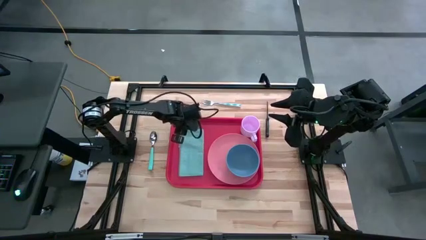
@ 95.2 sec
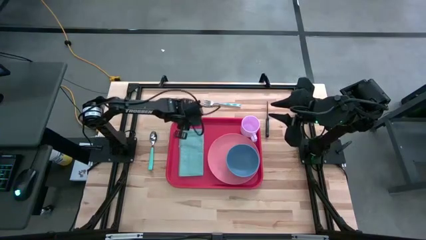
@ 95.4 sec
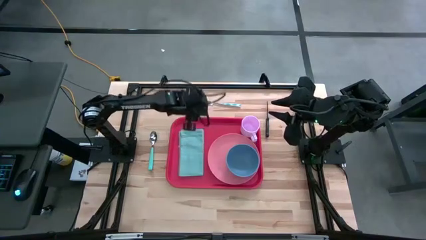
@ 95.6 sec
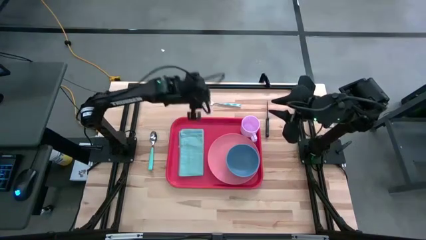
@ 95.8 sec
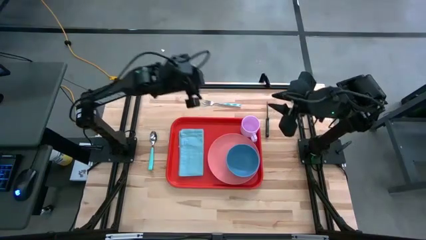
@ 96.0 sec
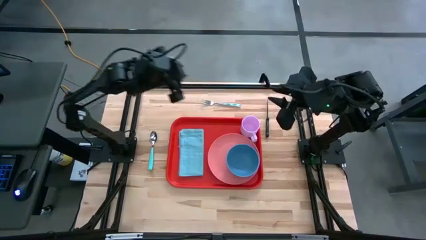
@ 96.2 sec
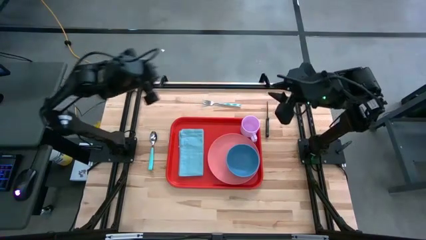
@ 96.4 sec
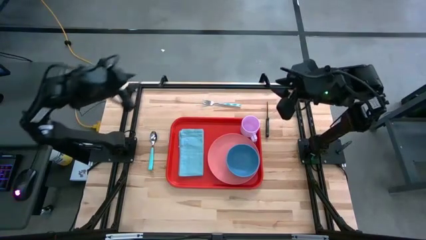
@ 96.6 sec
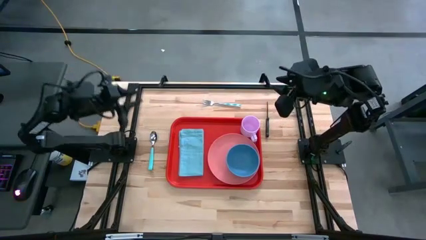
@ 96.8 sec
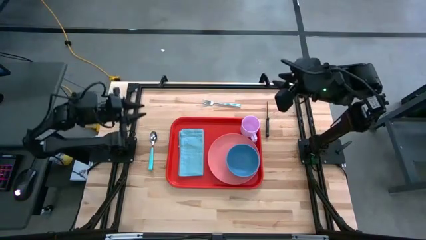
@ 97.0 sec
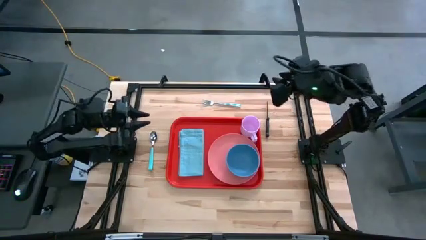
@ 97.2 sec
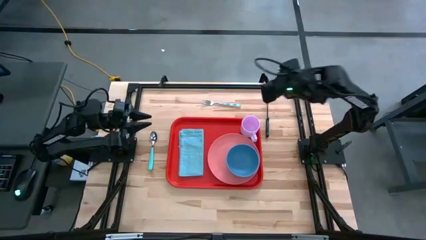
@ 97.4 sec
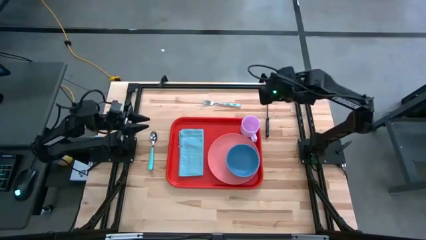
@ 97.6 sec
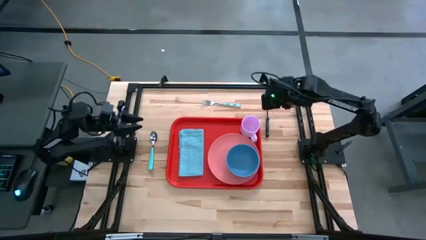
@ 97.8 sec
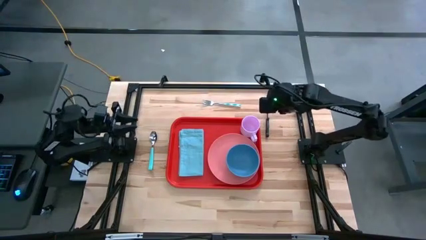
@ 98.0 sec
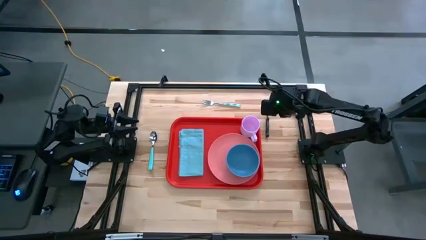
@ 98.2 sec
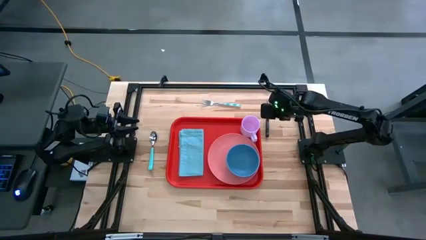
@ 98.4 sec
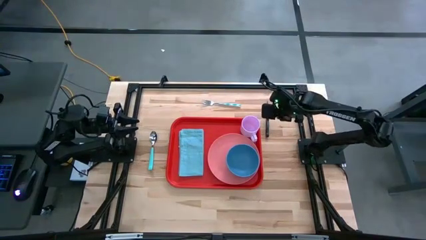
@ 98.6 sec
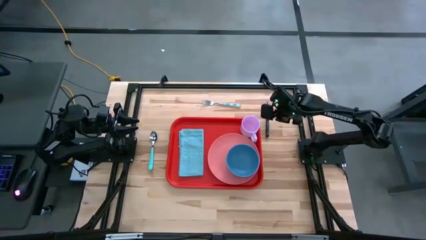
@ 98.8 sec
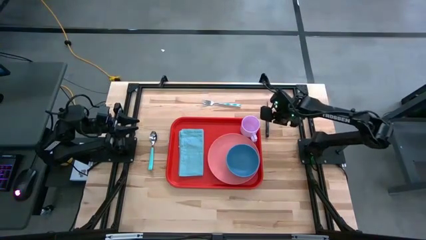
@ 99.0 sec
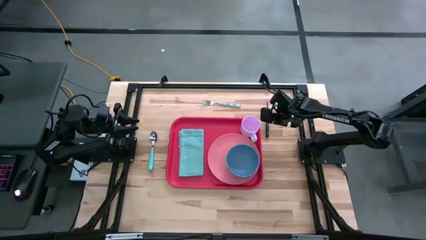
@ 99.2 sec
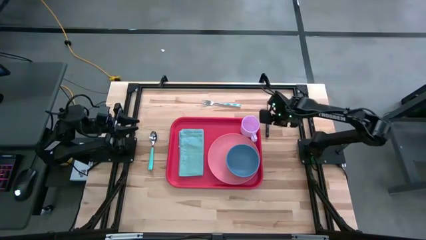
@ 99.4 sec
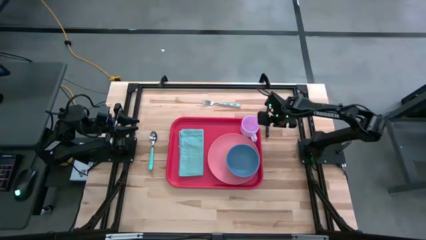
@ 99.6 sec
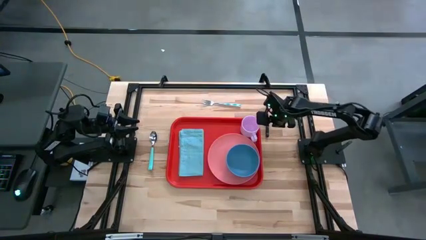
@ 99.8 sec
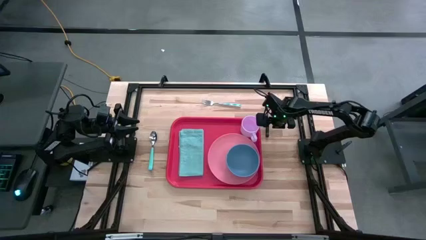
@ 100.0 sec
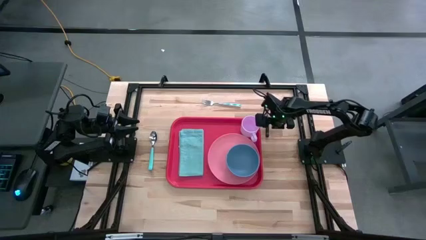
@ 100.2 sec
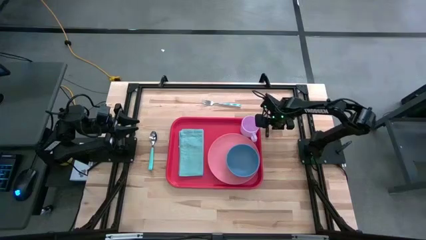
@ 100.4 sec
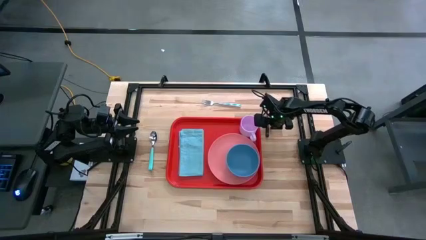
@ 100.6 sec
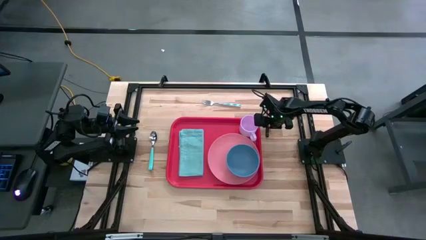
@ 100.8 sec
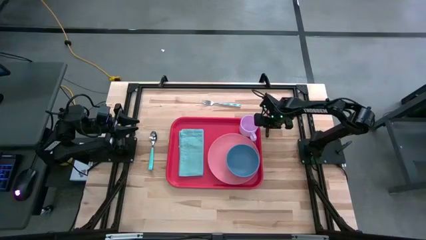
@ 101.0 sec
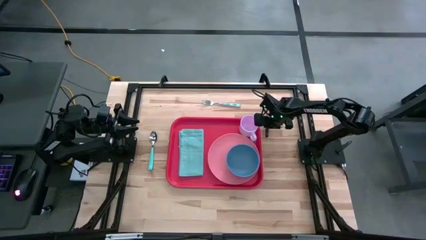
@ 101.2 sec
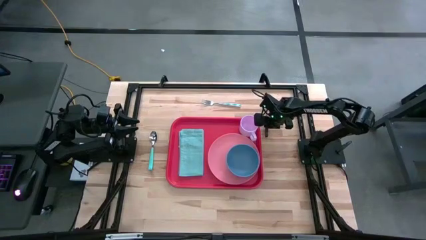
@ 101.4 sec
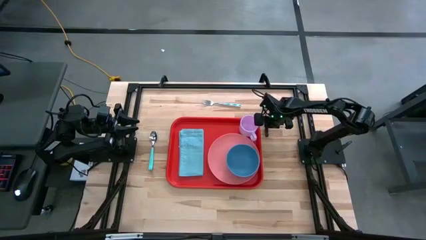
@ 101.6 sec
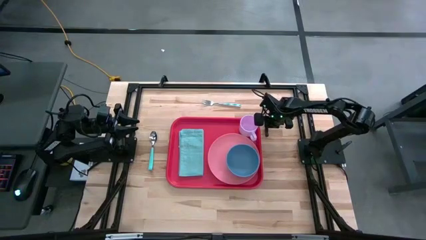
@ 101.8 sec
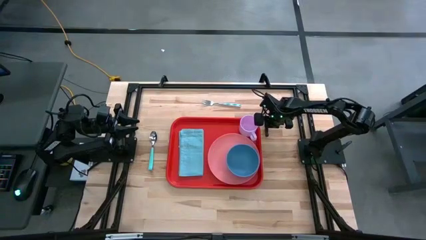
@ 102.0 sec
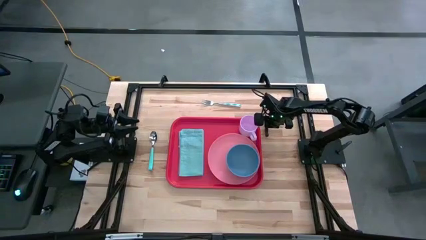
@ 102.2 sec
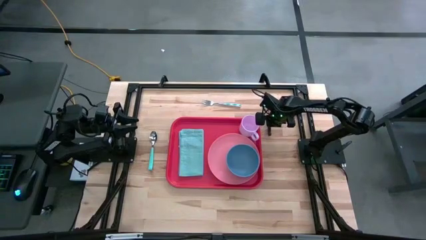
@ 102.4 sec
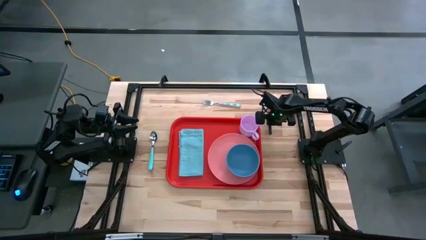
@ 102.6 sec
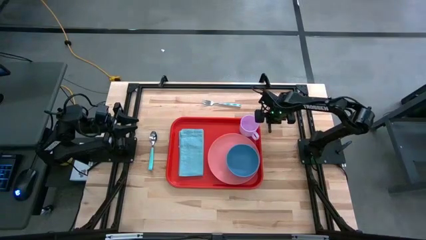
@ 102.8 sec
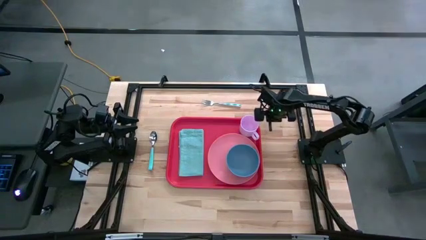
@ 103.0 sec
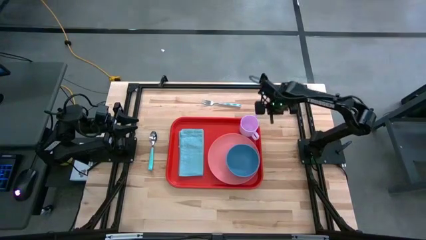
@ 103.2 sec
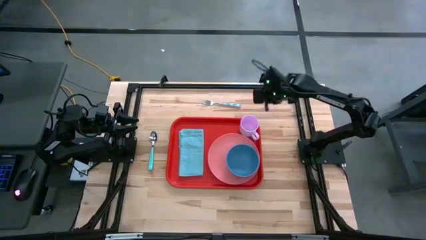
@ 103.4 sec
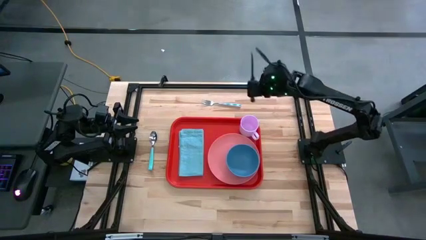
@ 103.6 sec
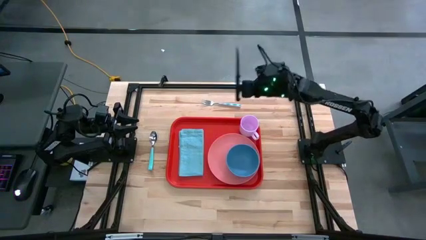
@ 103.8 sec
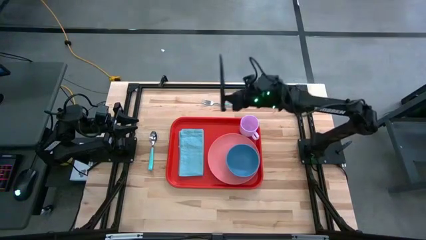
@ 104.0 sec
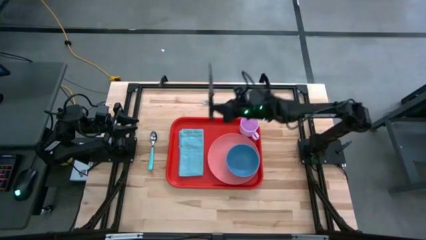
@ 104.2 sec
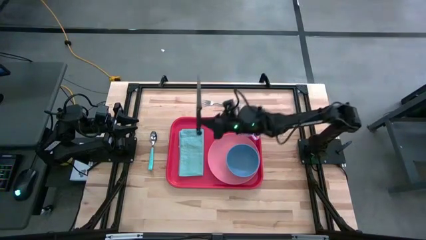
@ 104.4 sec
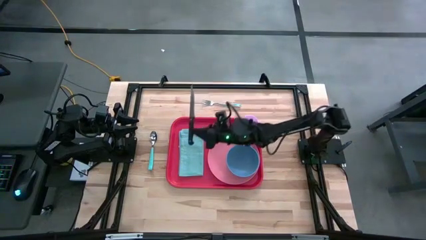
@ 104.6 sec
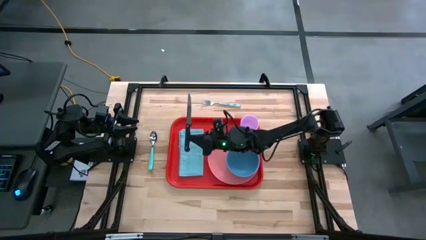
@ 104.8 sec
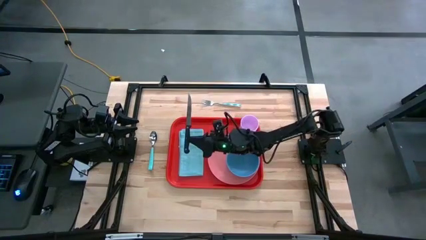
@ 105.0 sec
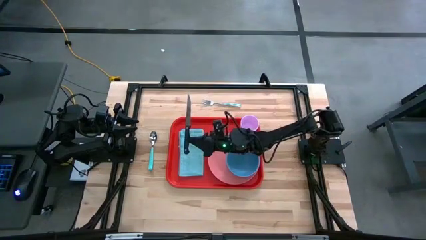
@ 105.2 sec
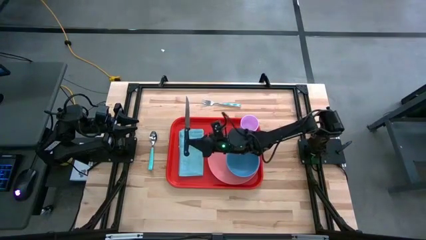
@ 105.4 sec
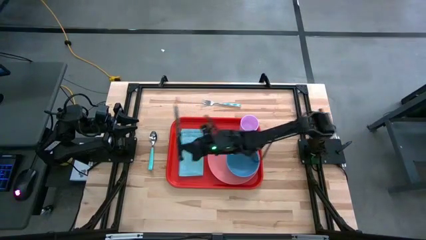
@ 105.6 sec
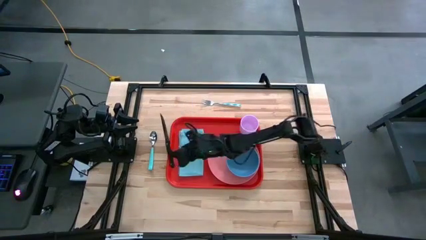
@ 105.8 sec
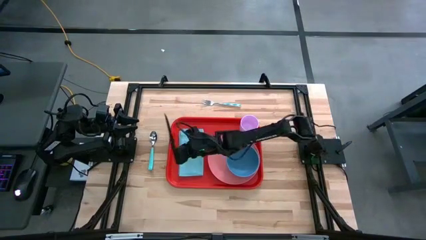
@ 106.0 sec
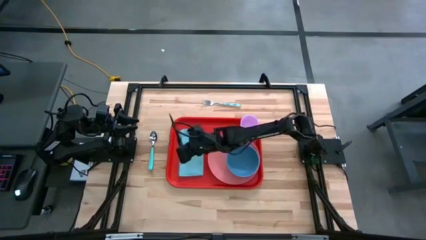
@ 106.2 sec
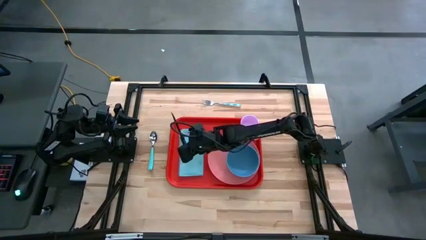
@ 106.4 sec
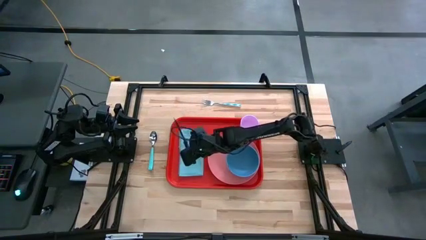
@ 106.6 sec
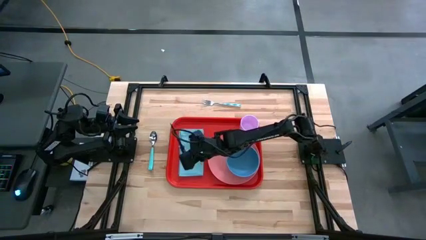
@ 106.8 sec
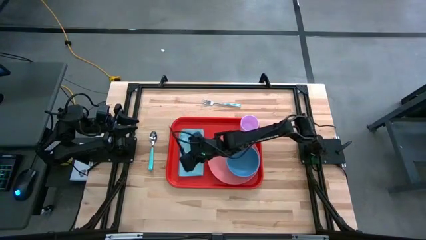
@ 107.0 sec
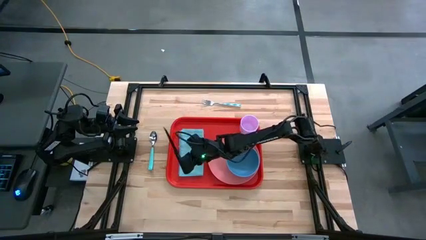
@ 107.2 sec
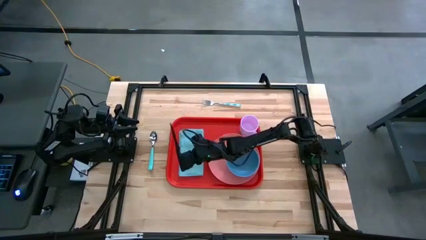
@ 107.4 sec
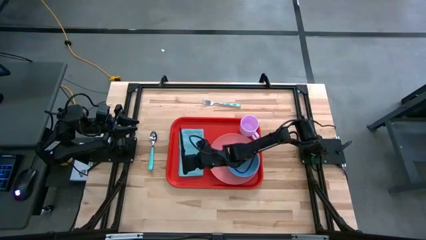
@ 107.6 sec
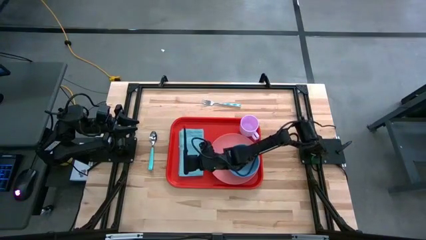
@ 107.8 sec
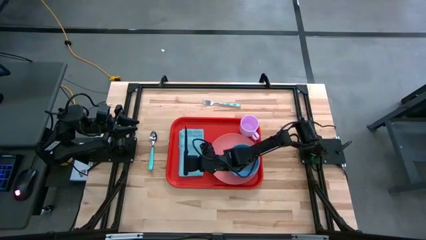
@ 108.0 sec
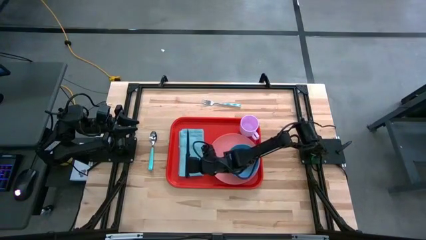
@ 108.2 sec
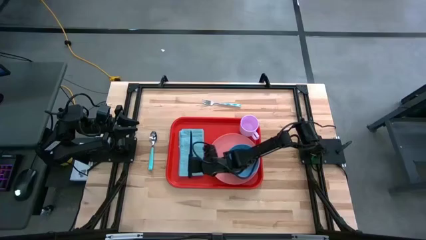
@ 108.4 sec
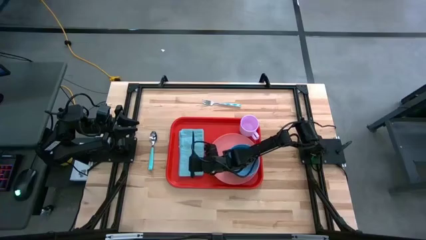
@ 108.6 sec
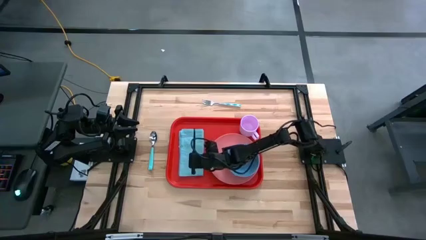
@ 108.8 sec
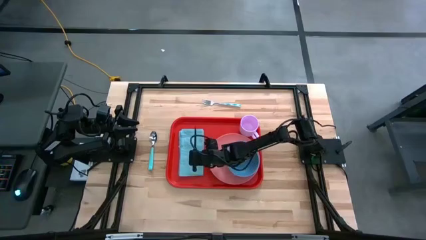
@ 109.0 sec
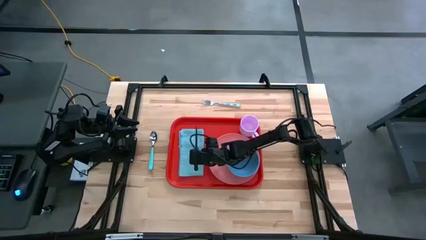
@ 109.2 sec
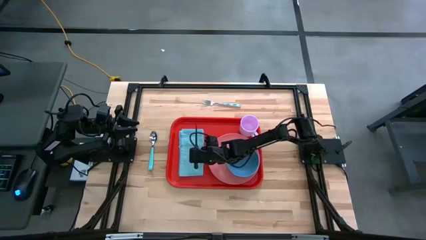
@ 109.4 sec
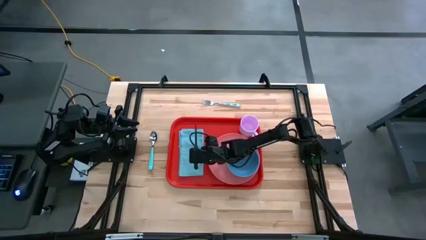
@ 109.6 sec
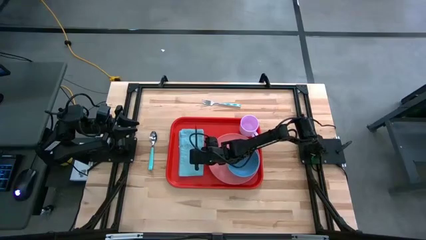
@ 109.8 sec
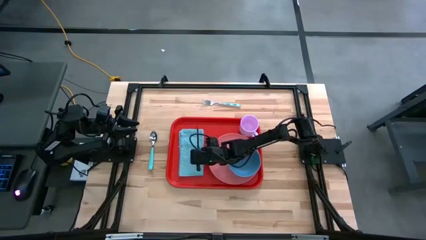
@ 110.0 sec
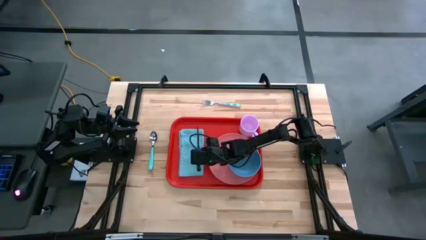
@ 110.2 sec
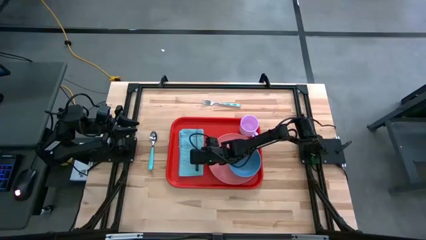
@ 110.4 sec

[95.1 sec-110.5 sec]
Task: Set up tray
Put the black knife on the blue napkin to the left of the pink plate

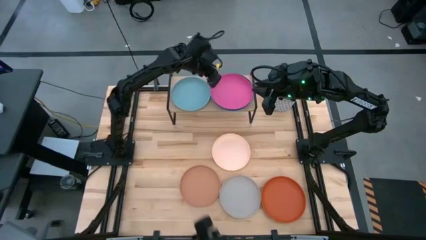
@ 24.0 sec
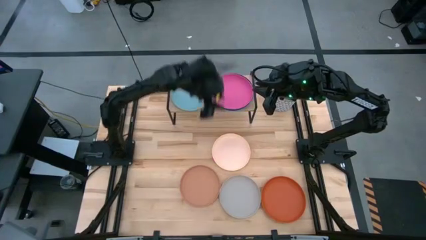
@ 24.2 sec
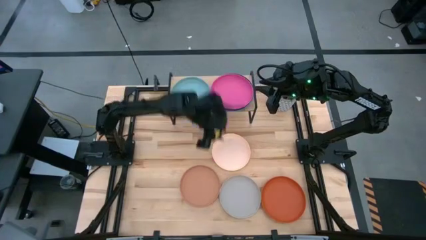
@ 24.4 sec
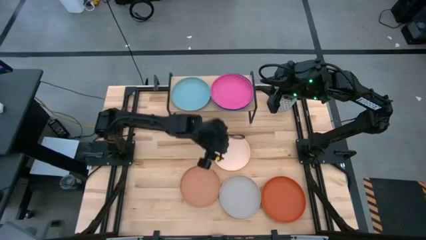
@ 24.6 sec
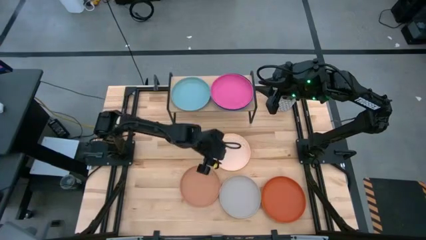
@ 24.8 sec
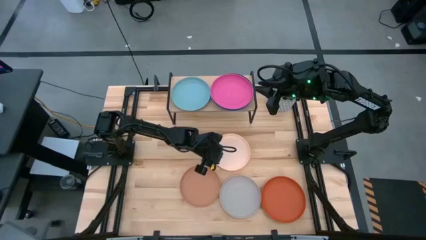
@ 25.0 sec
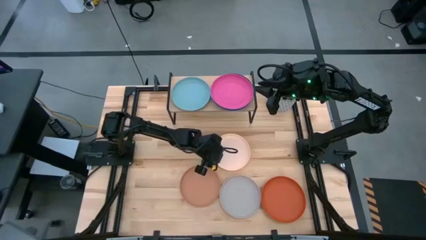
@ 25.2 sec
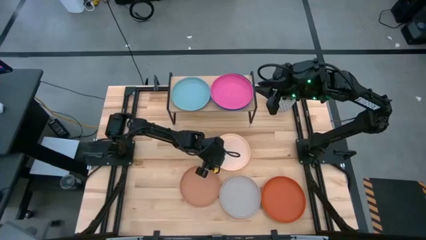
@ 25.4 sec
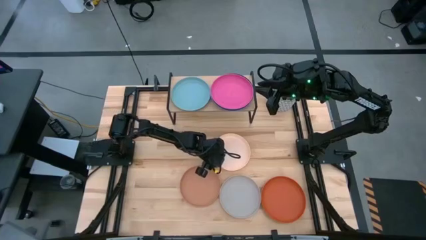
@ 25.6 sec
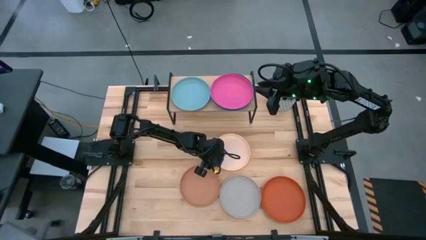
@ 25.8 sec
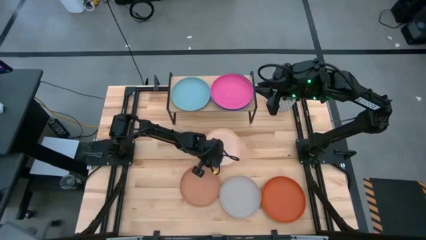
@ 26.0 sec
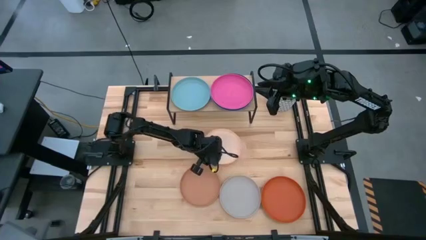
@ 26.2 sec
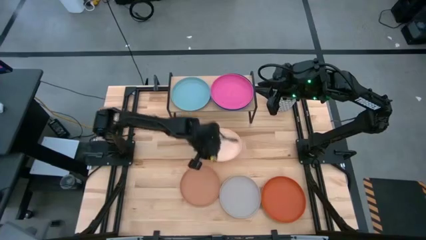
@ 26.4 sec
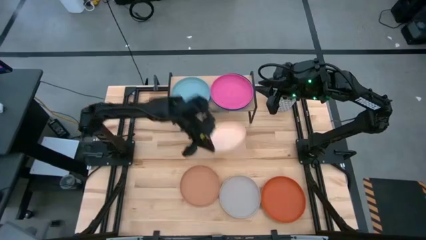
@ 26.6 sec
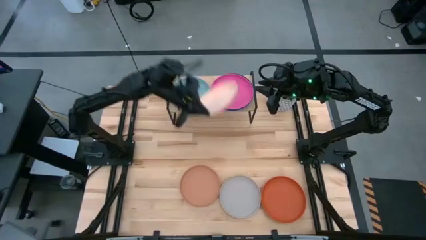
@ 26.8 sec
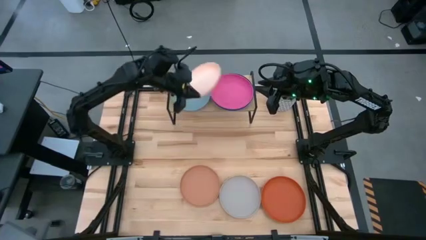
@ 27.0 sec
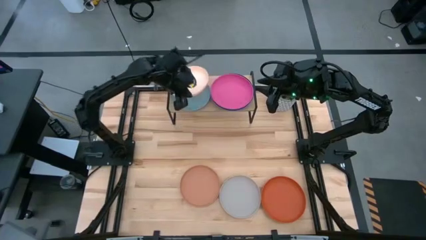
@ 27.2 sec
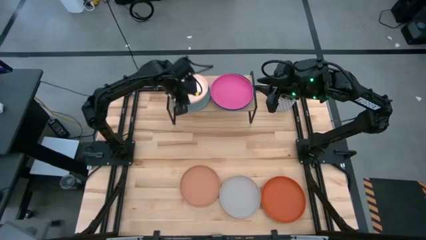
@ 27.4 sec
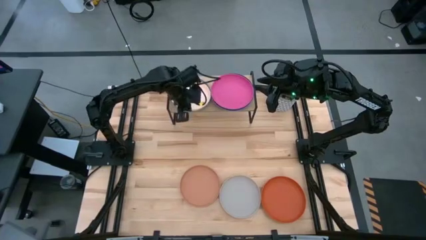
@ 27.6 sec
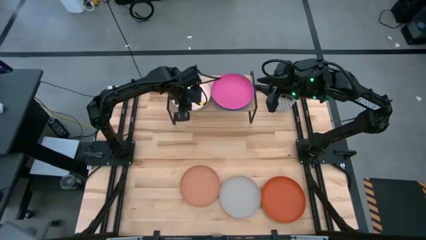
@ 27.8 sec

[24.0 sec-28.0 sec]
Task: Place and stack plates onto a shelf
Stack the light orange plate on top of the light blue plate on the shelf
